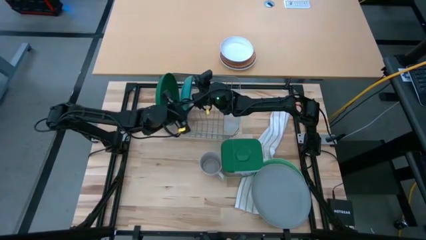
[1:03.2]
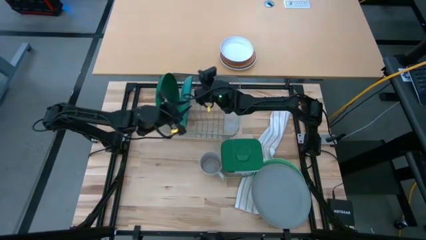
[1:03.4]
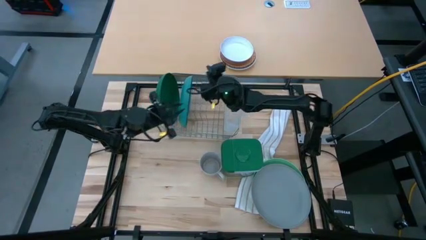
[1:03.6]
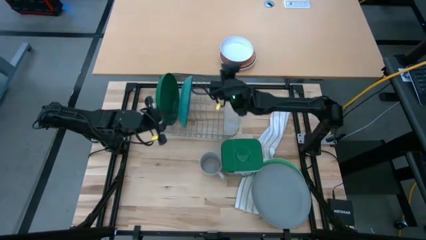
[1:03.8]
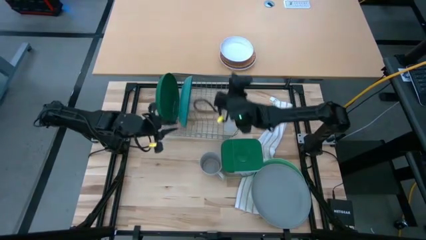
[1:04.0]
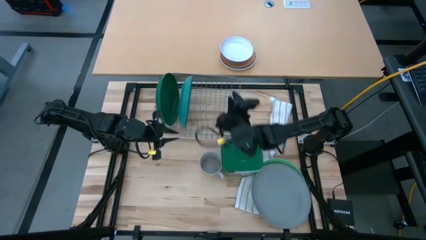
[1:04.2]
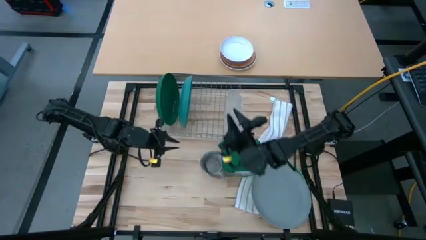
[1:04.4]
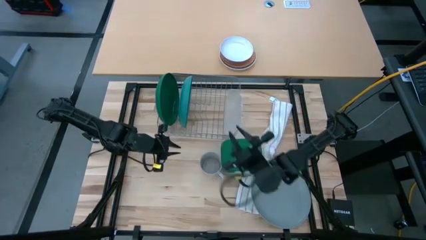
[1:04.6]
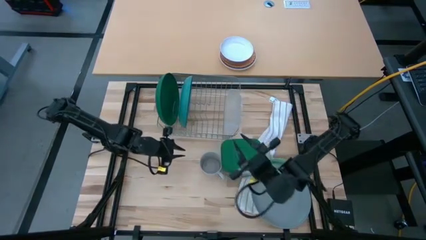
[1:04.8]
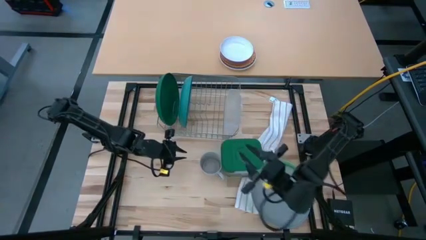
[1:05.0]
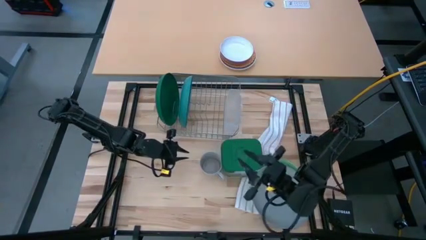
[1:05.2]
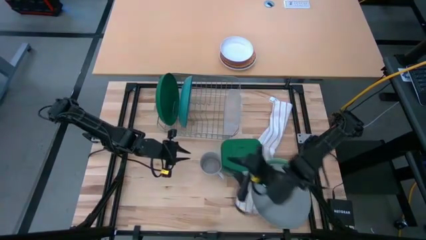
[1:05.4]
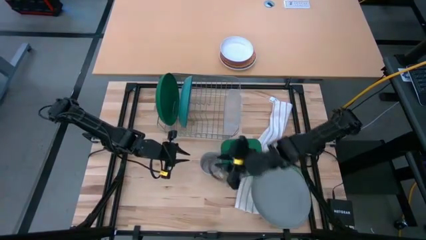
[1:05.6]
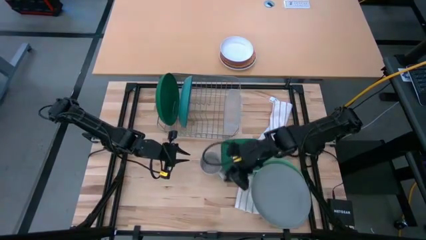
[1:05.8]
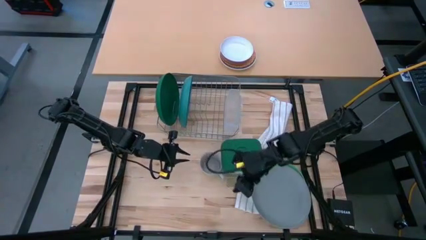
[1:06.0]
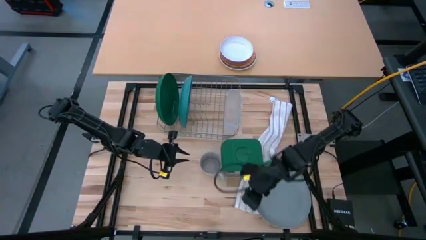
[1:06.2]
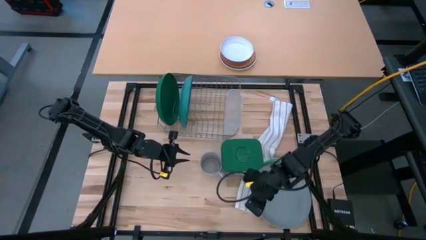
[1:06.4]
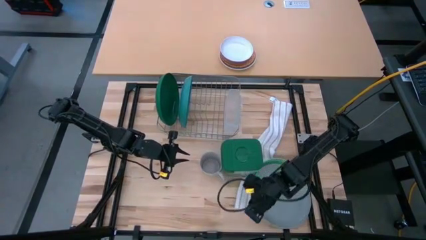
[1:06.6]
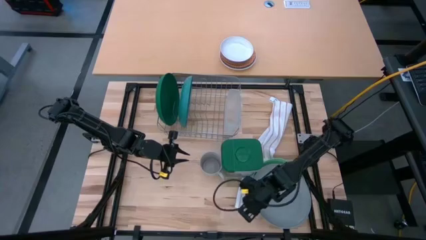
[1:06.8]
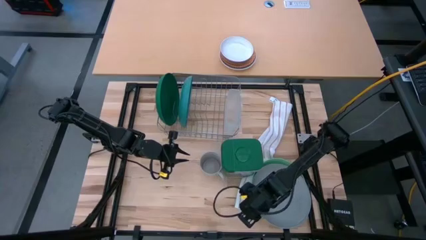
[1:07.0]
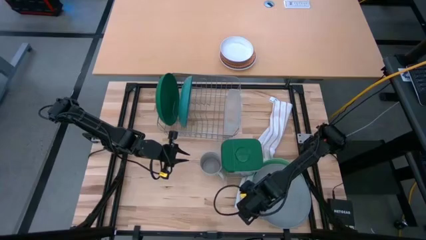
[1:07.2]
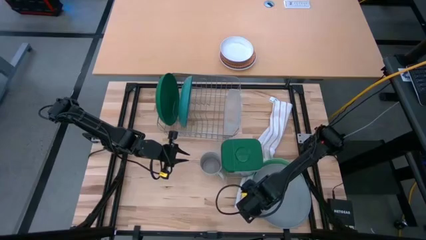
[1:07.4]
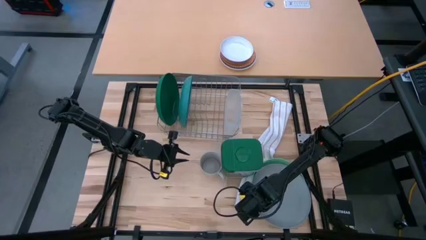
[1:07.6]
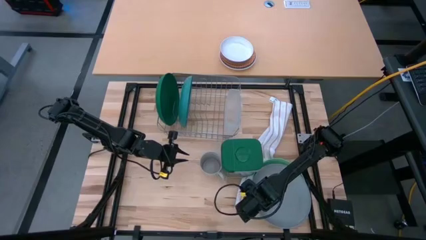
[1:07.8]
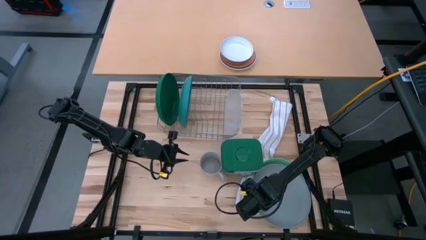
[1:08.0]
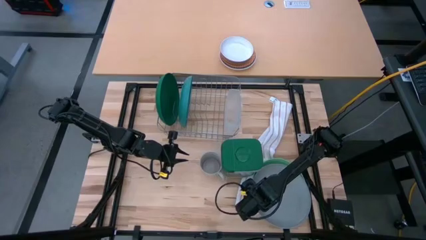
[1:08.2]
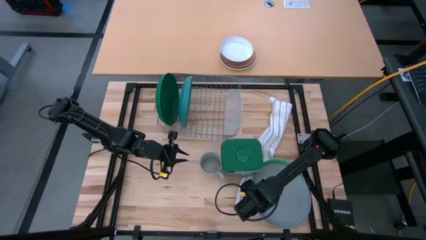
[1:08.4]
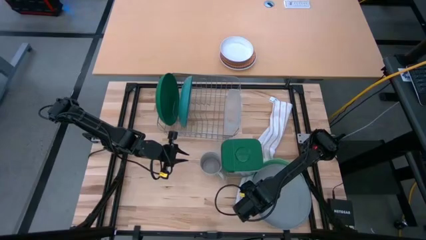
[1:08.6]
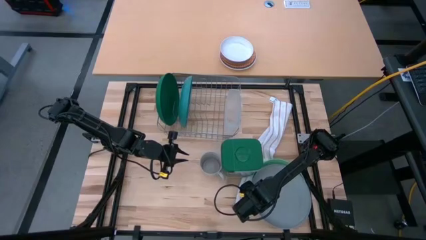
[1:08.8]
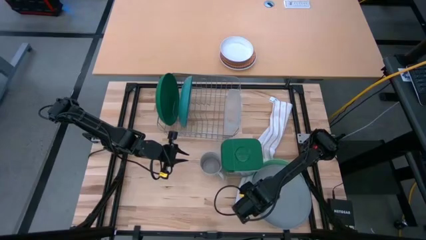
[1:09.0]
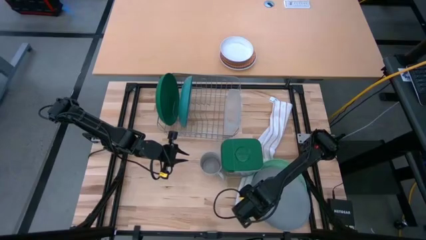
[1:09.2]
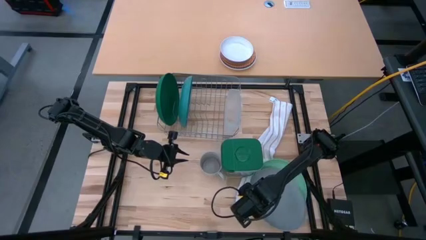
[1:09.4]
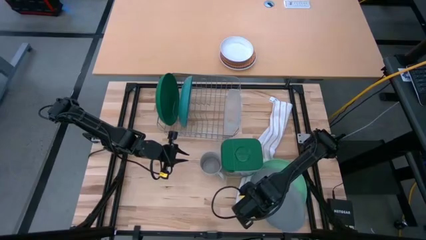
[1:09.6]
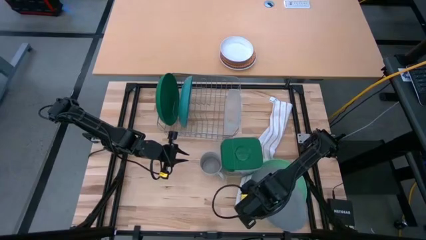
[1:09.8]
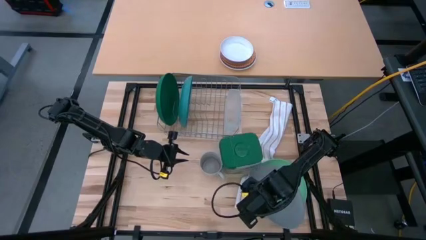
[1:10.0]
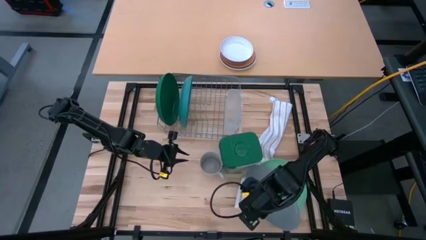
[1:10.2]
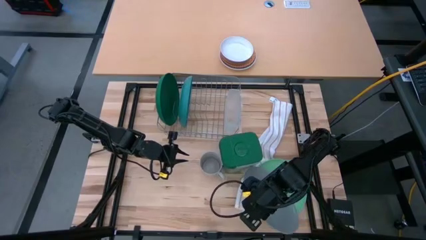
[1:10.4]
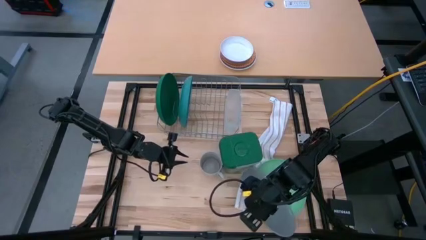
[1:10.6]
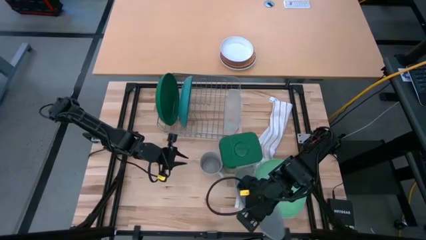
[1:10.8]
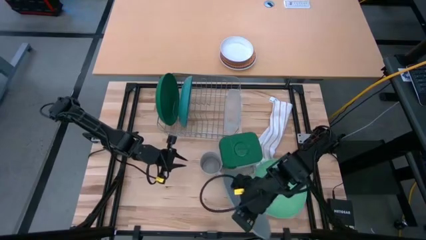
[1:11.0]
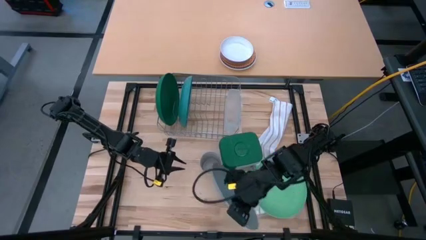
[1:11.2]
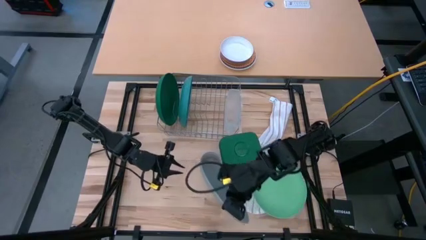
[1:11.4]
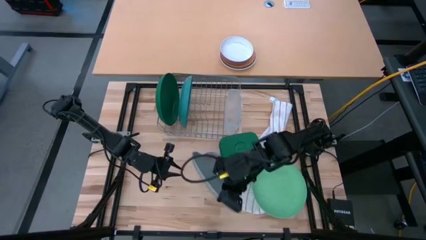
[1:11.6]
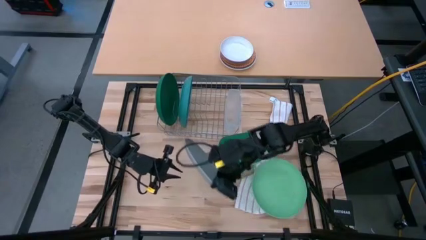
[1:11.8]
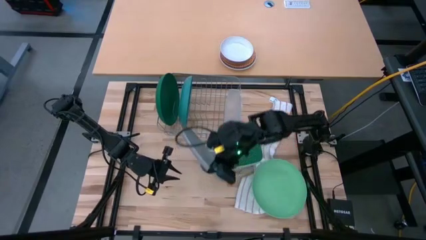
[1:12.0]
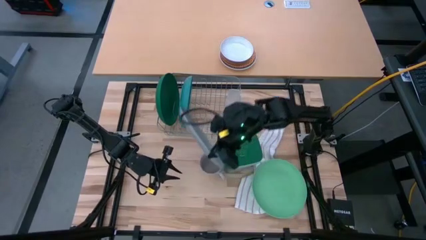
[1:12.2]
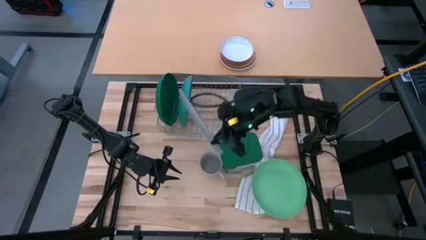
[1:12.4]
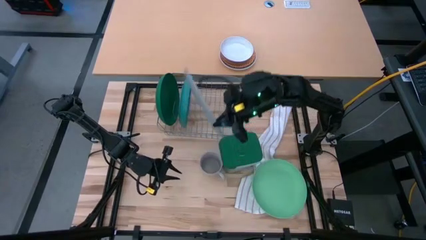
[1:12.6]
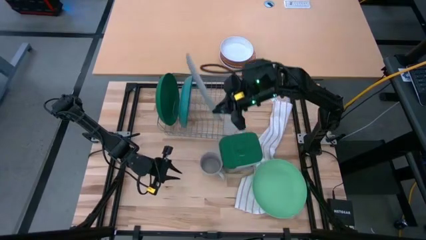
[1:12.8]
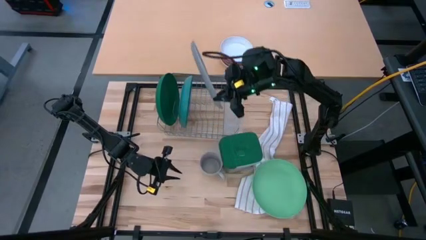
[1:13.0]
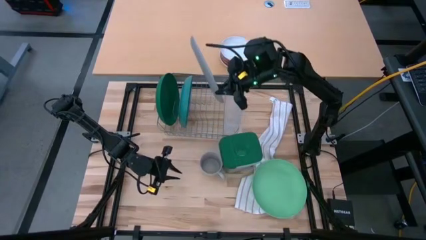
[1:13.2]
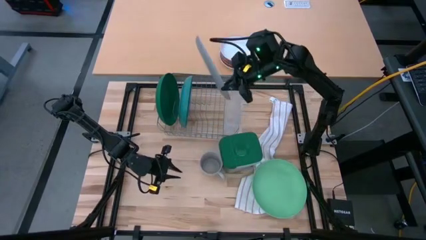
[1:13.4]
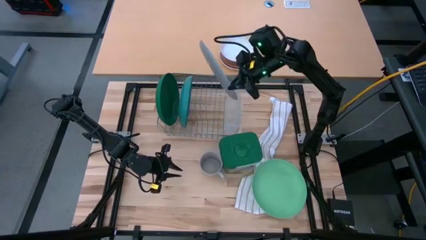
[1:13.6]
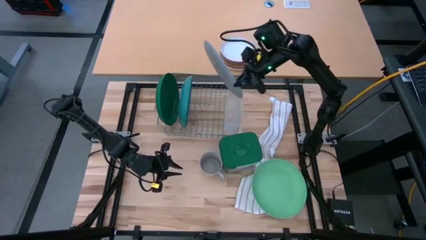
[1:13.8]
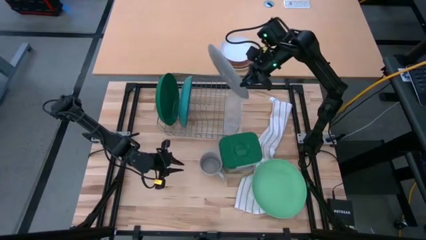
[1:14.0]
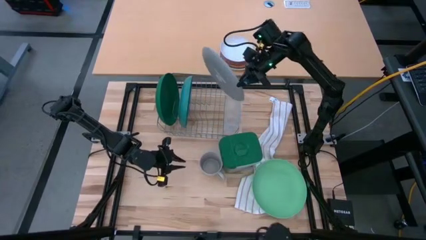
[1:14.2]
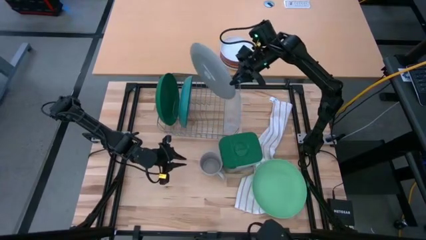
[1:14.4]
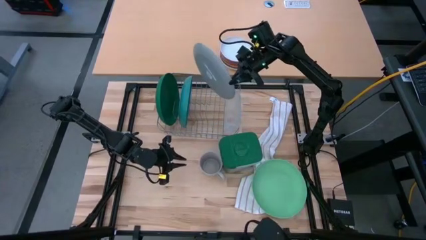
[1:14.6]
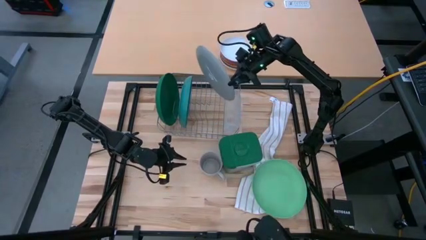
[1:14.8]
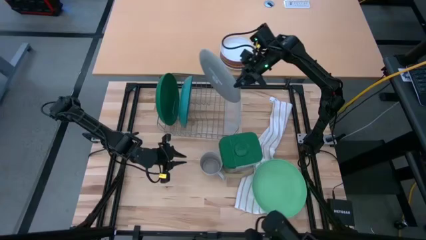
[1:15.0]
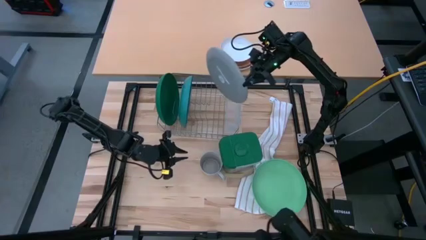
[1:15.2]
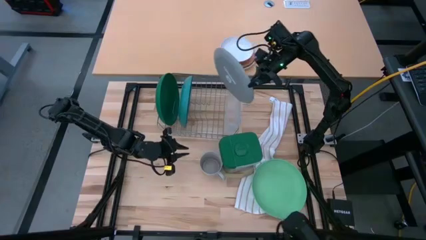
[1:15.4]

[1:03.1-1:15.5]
Task: Sort dishes
Put the gray plate in the dish rack

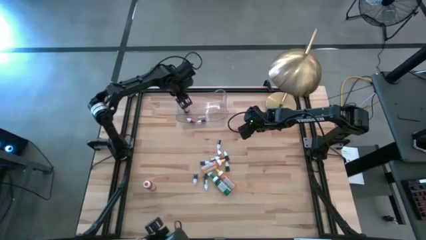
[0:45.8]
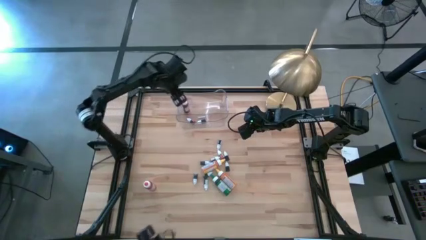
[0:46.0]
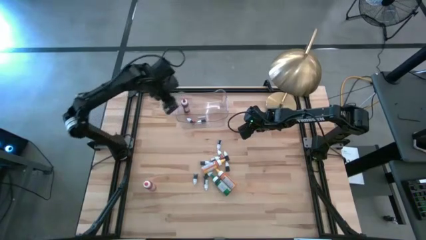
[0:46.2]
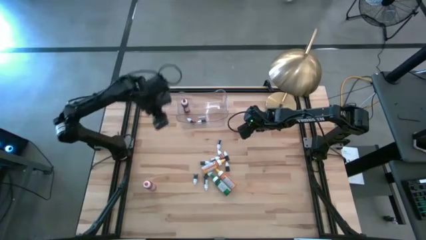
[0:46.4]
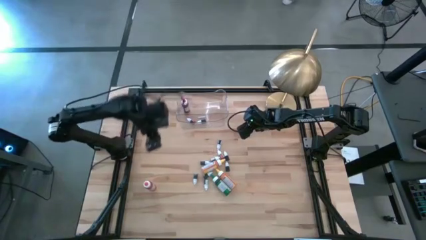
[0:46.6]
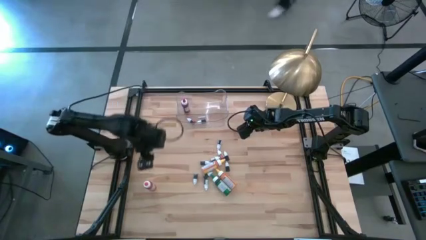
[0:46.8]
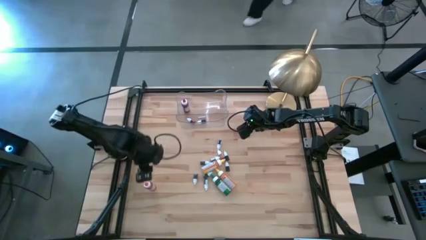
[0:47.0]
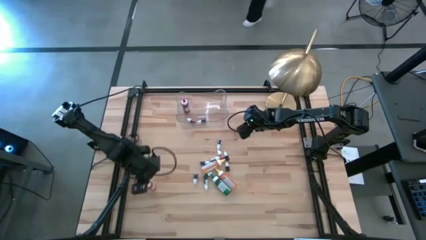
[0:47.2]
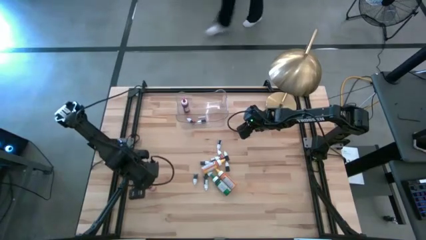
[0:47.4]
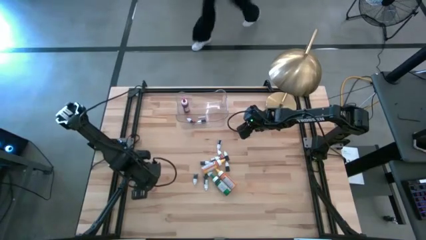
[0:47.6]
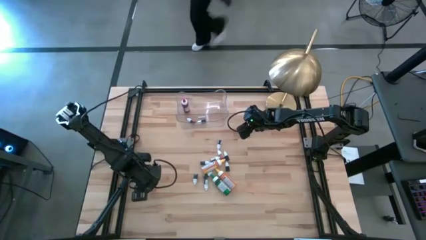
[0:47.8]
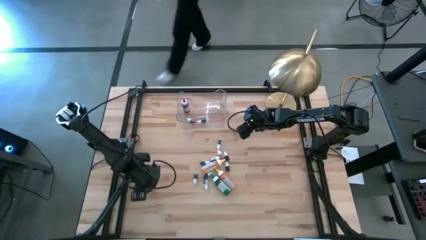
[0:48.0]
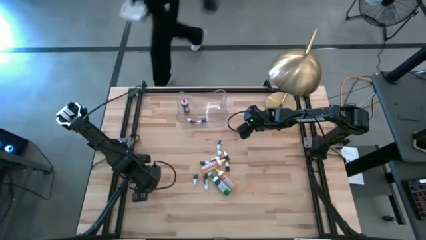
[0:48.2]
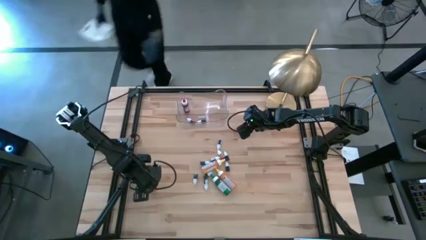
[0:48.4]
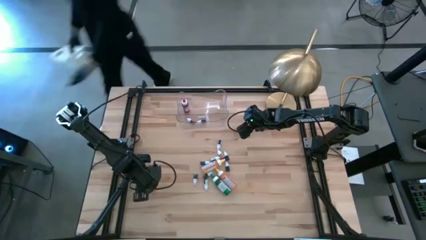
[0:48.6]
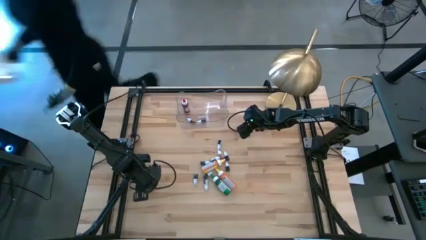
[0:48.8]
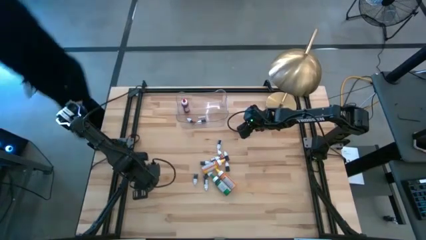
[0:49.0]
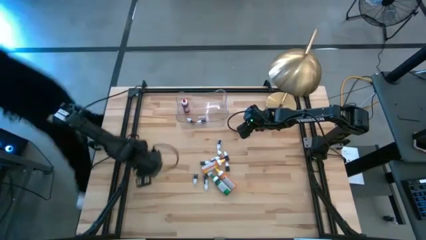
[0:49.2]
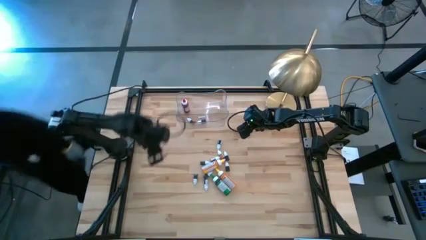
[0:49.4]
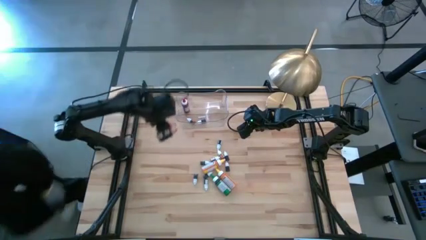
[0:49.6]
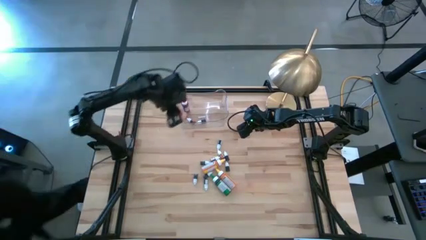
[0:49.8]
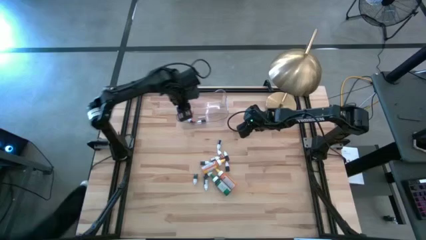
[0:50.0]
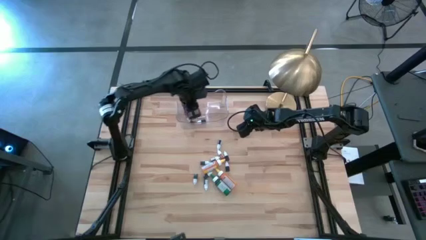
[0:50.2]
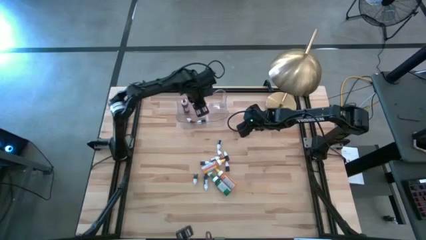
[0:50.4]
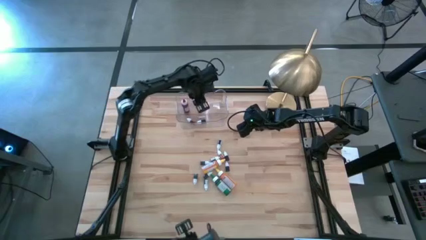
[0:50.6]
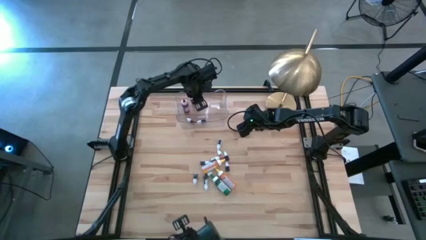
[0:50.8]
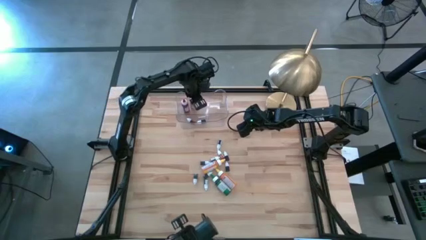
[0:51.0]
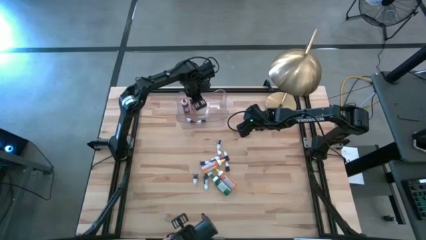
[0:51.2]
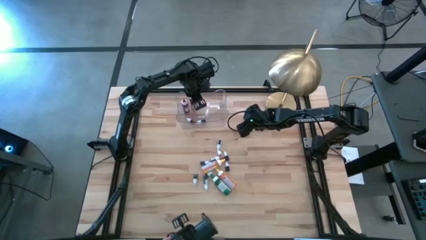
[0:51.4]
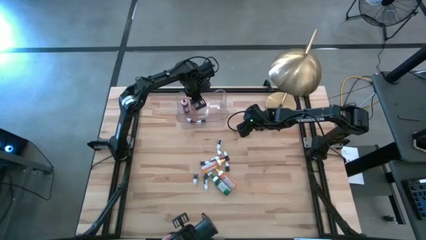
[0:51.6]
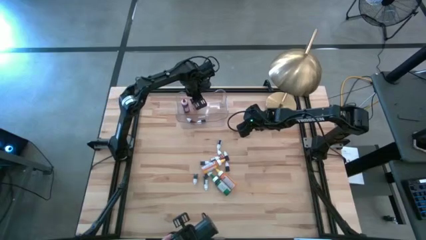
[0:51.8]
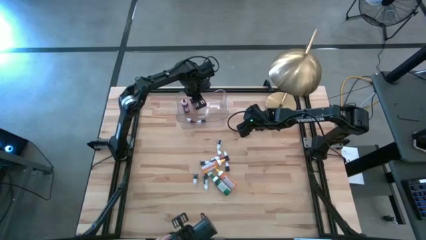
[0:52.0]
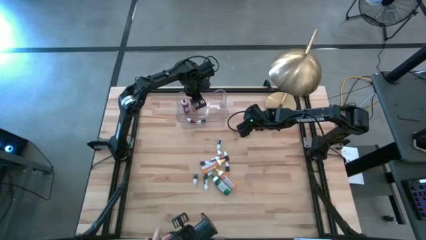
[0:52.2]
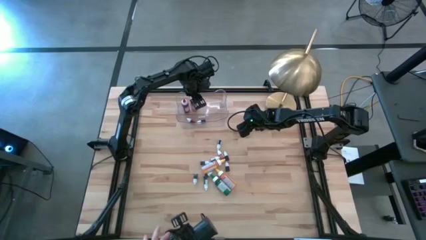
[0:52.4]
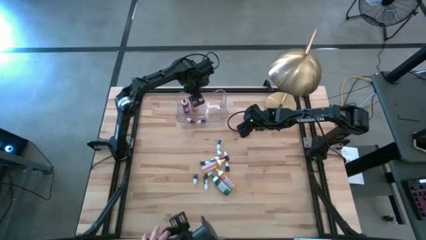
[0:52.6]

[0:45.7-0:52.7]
Task: Pick & Place food coloring
Put the large orange food coloring bottle into the transparent bin
